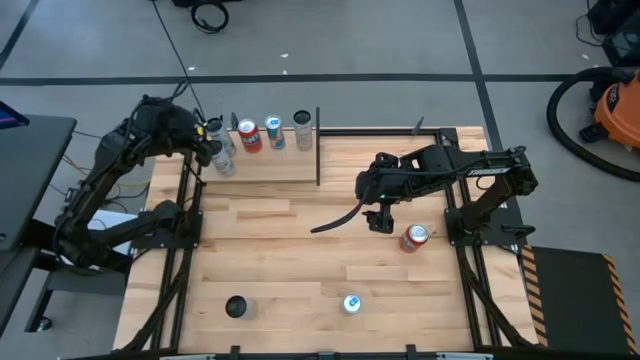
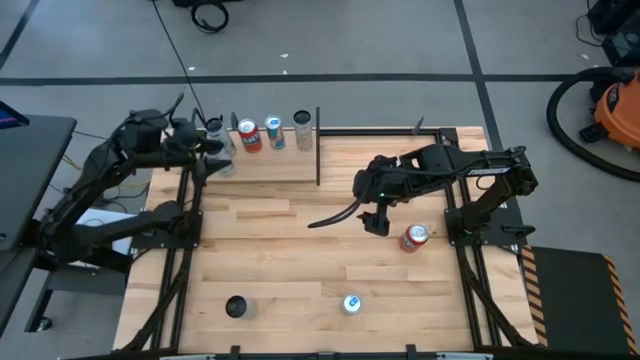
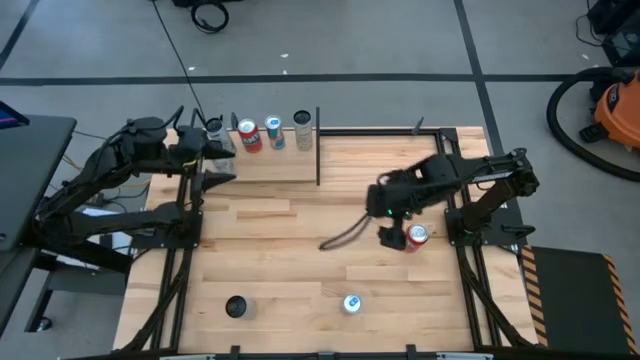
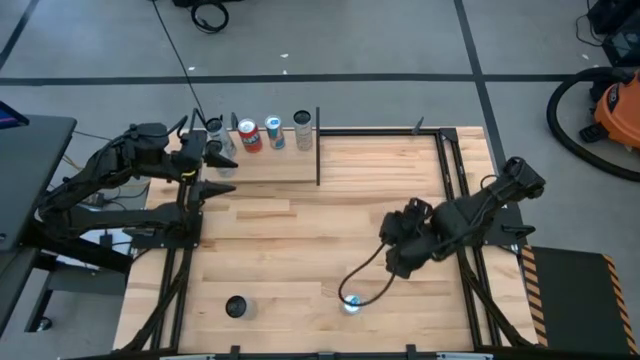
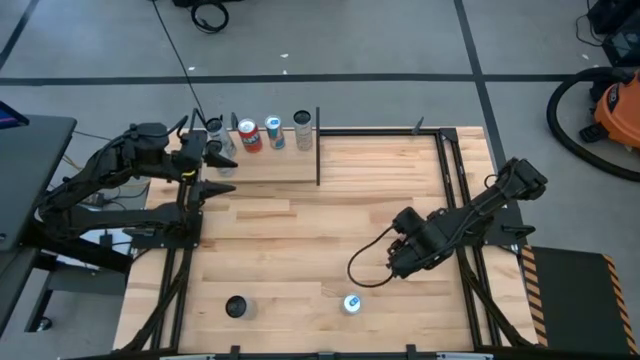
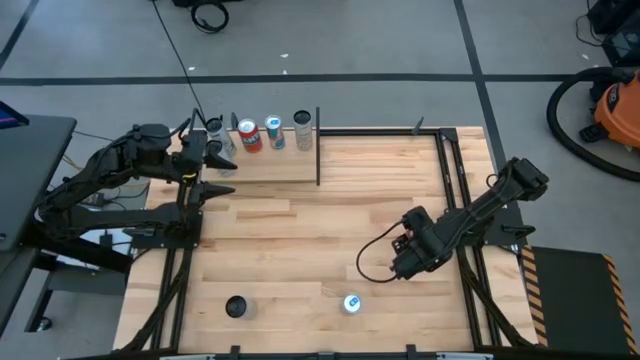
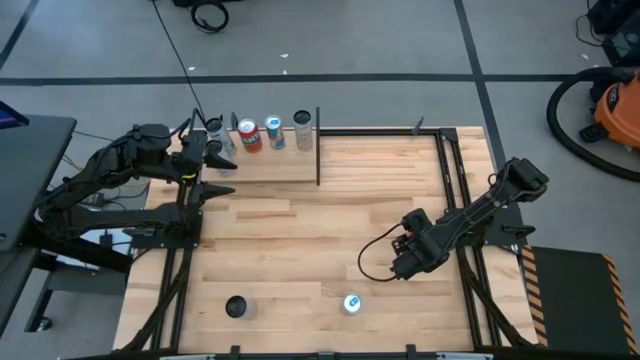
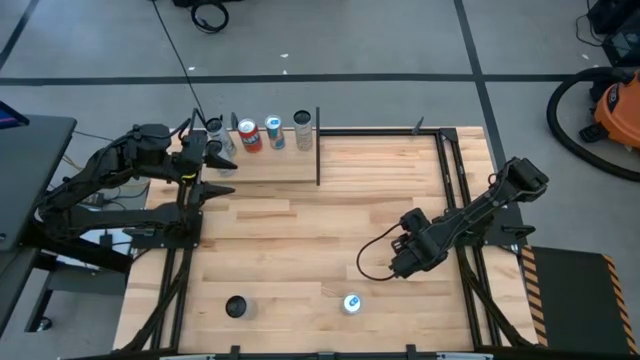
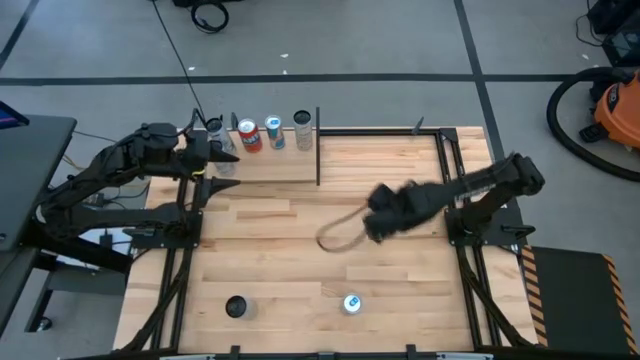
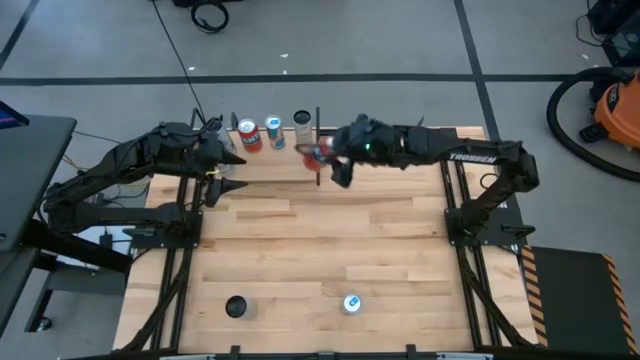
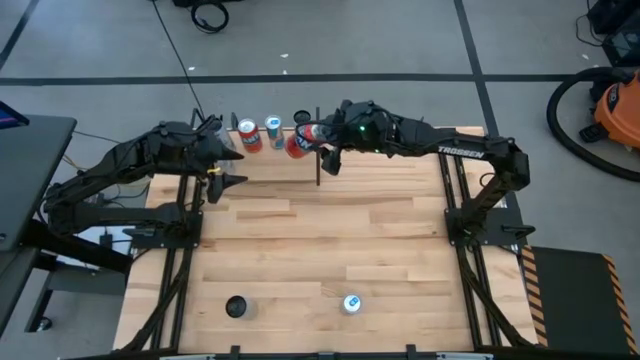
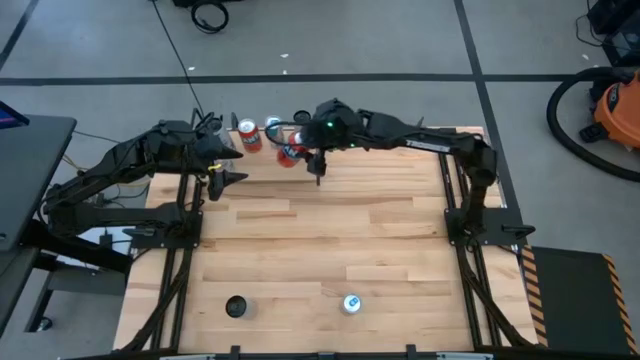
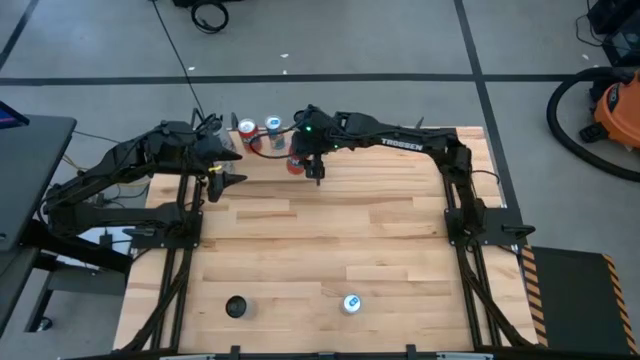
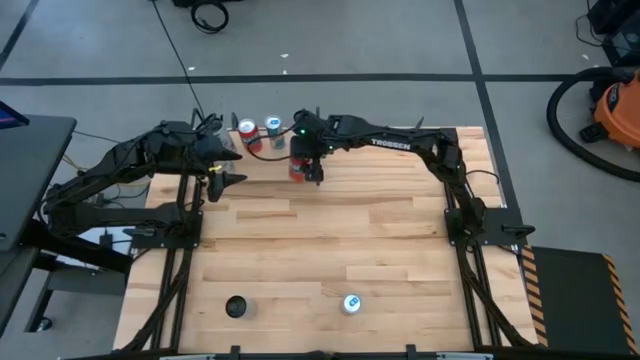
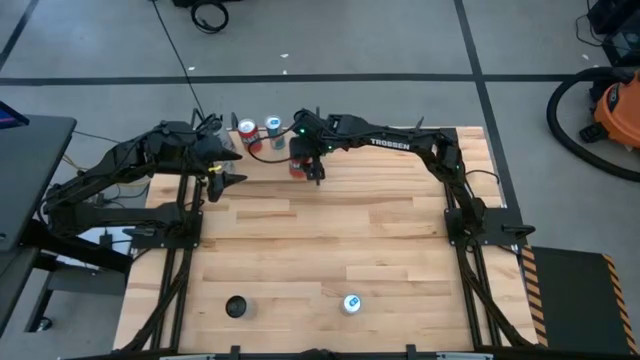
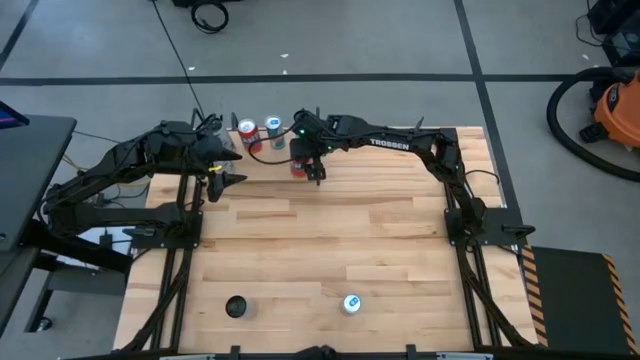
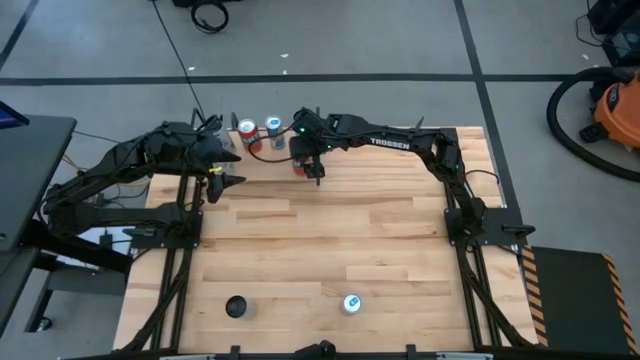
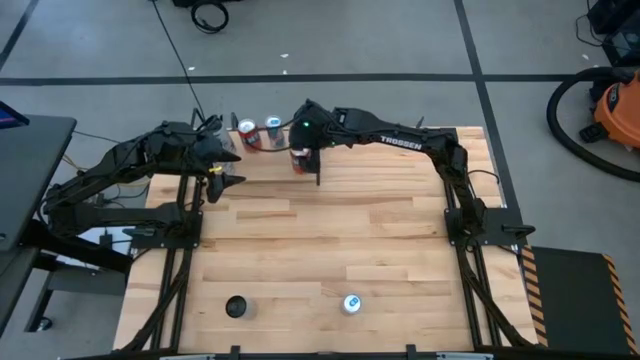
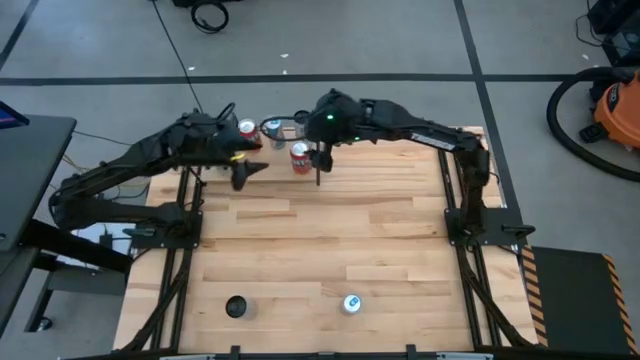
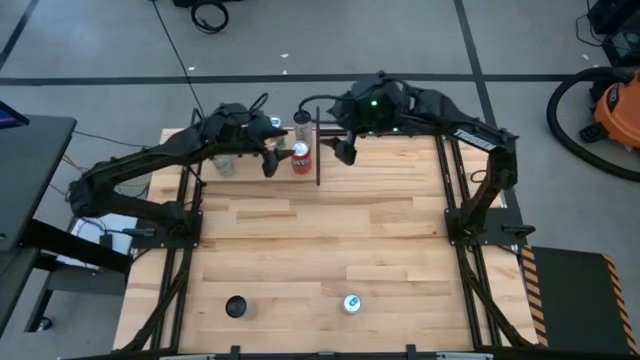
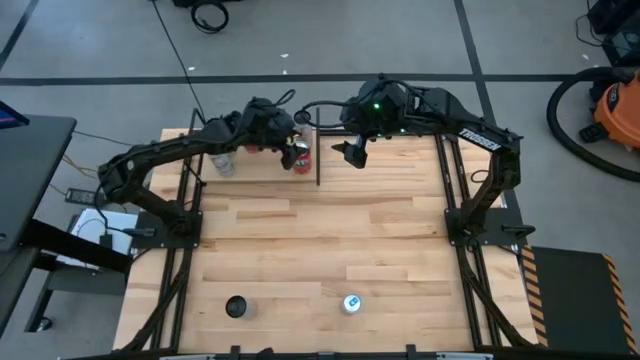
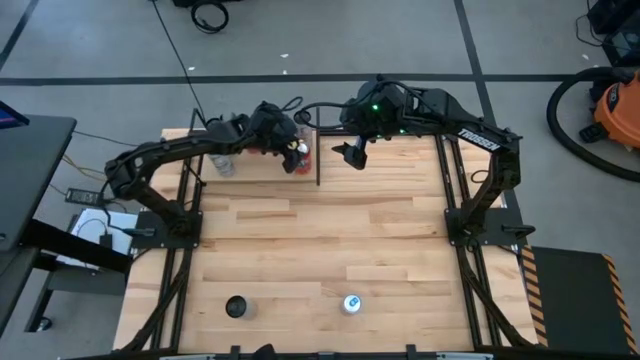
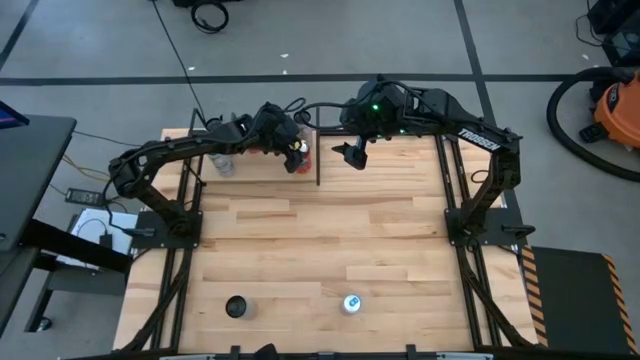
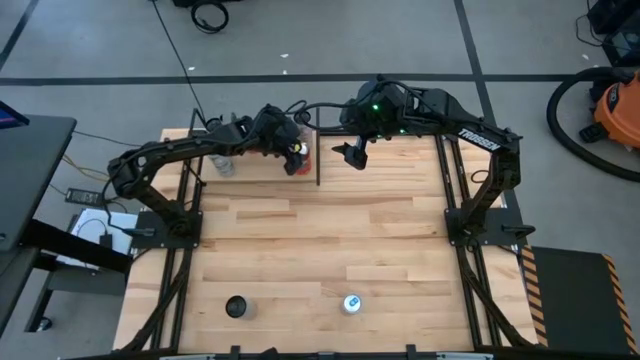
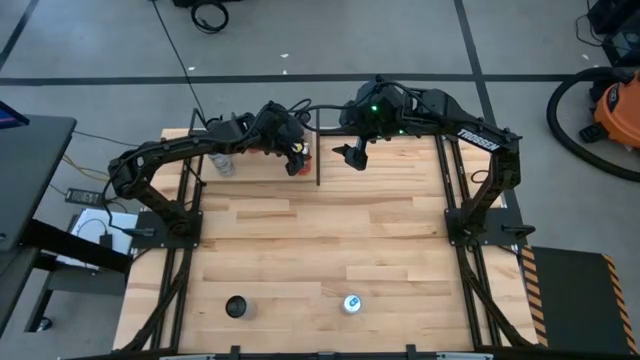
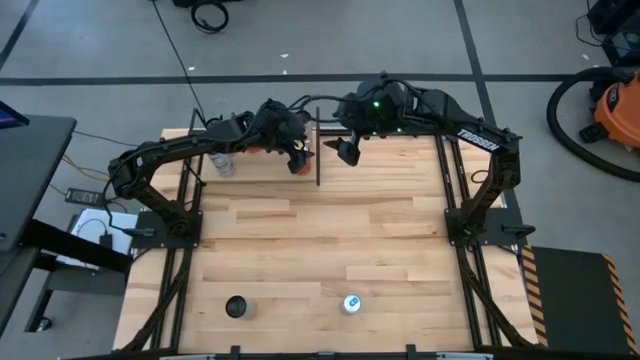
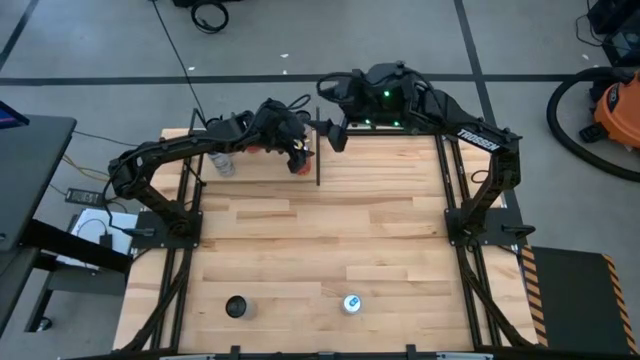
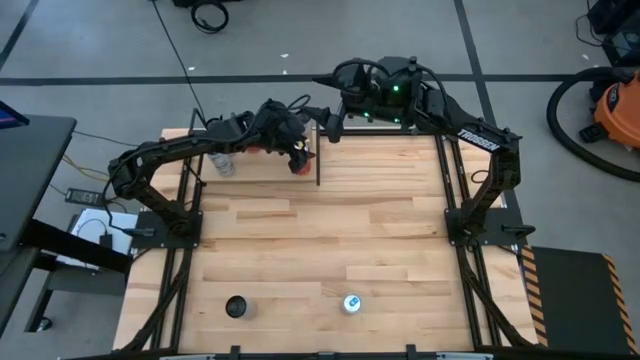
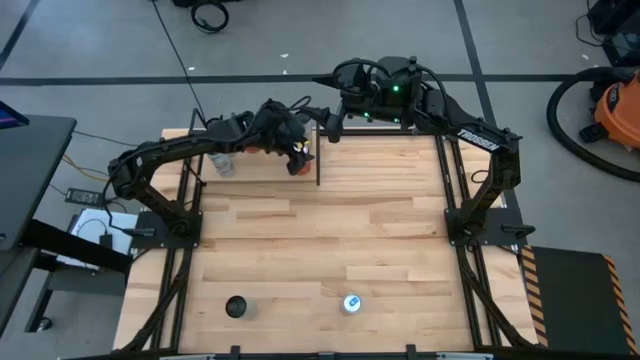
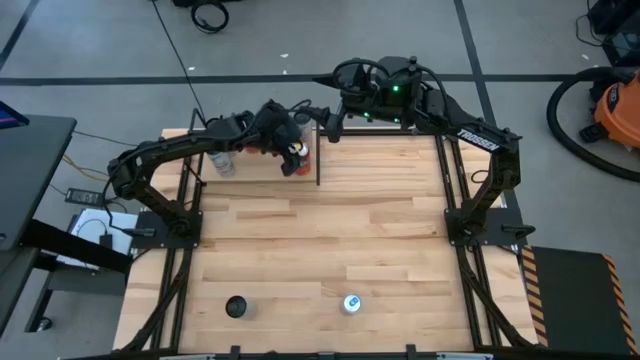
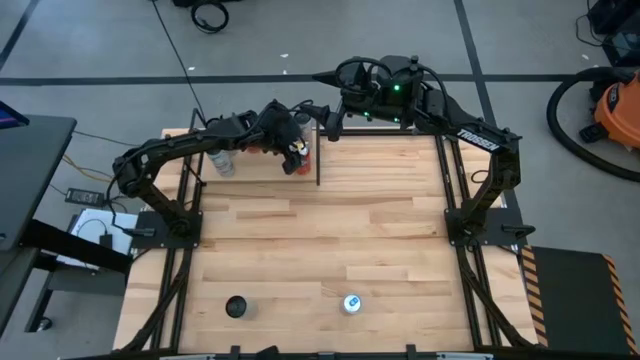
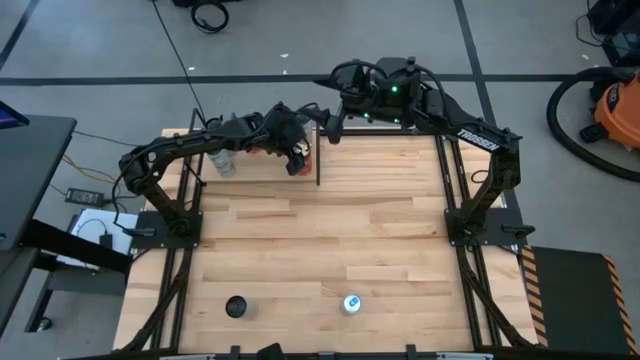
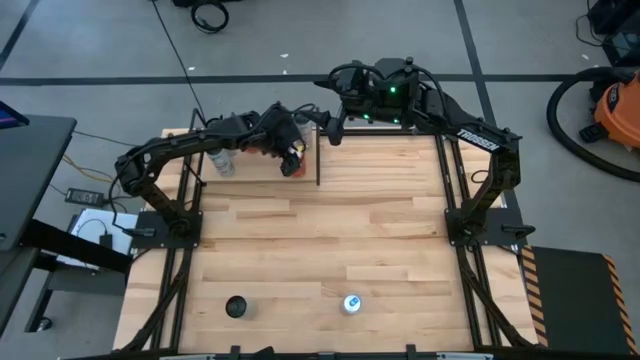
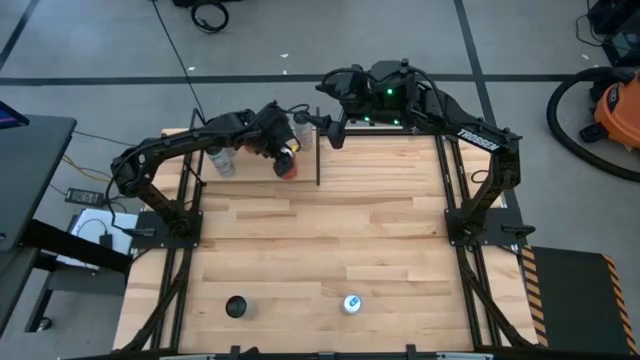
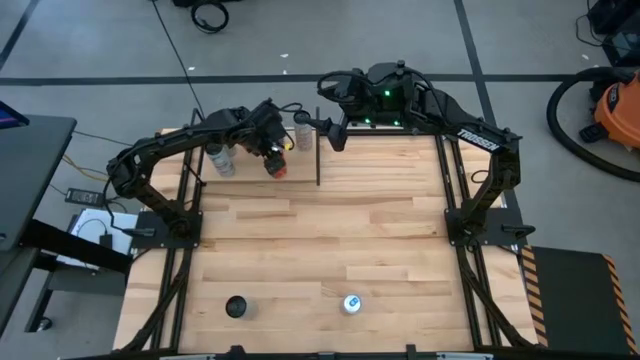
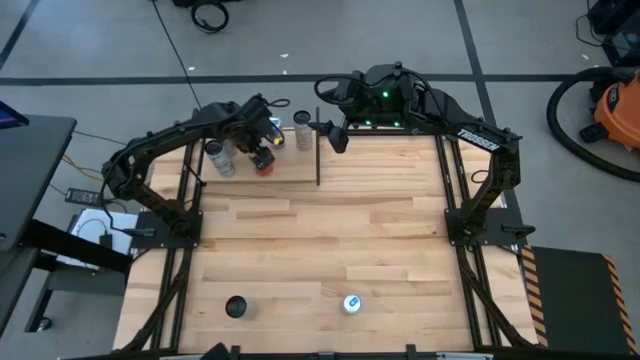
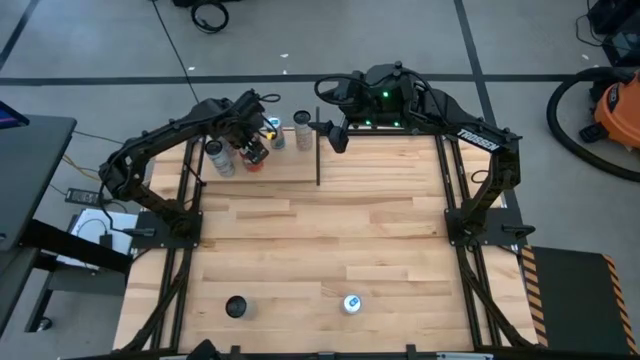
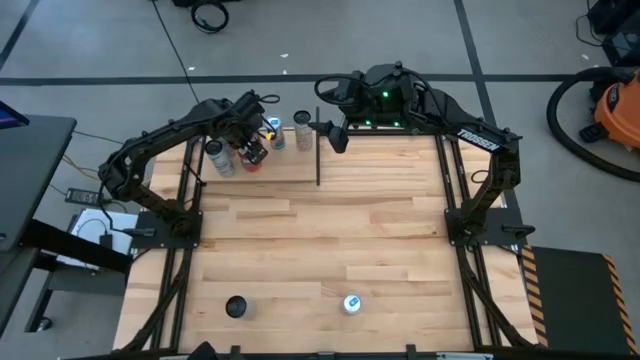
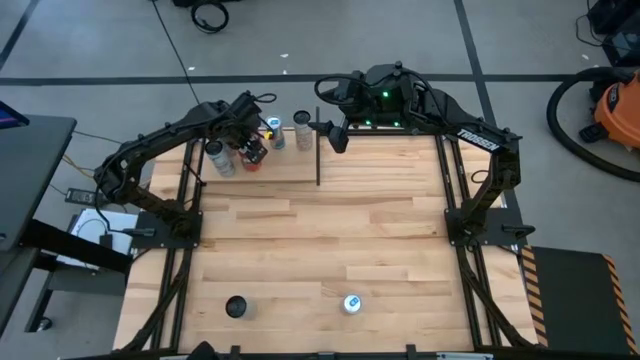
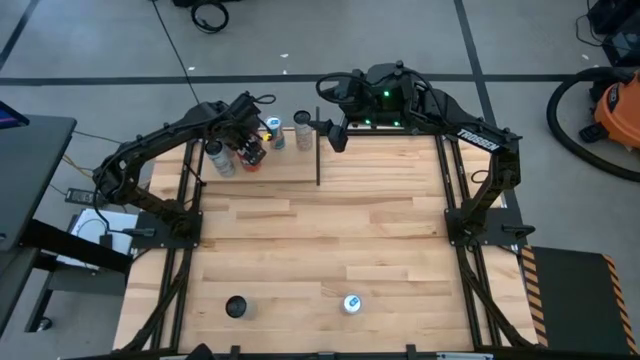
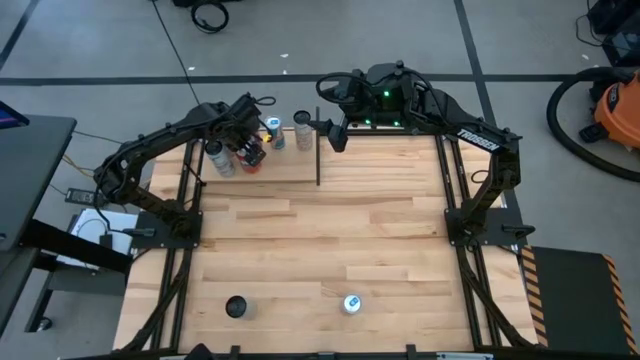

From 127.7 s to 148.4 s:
Task: Place canned beverage on shelf
Put the orange soda can aligned with the other orange soda can on the shelf
